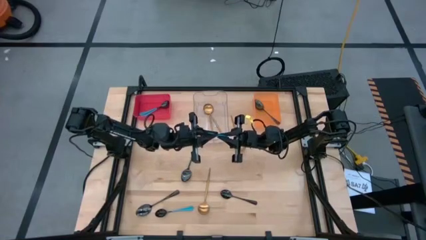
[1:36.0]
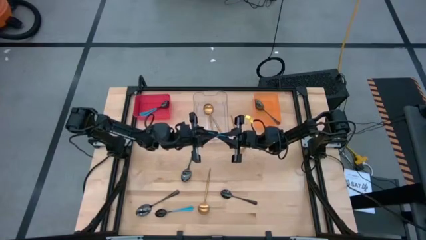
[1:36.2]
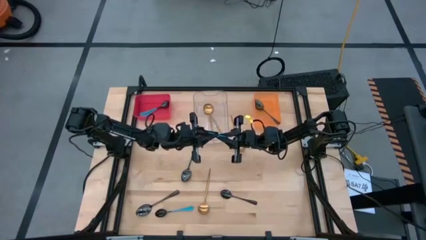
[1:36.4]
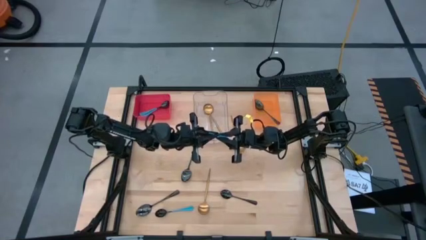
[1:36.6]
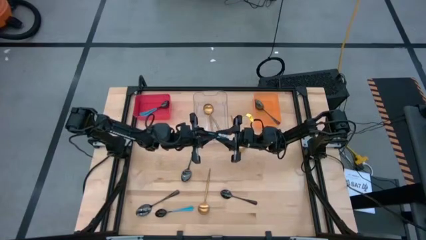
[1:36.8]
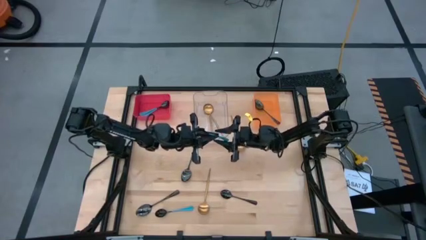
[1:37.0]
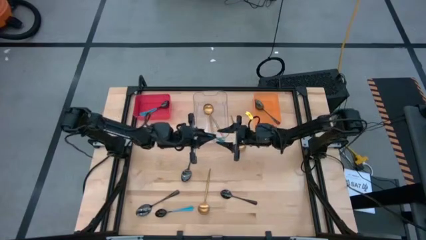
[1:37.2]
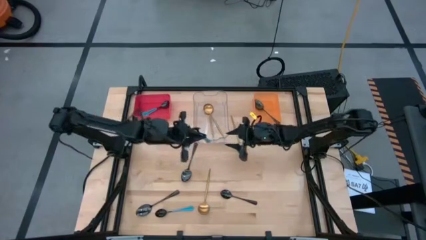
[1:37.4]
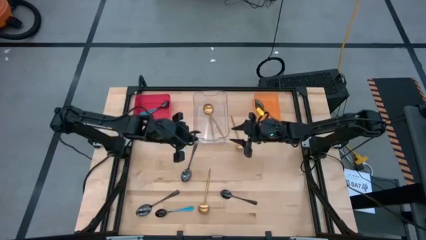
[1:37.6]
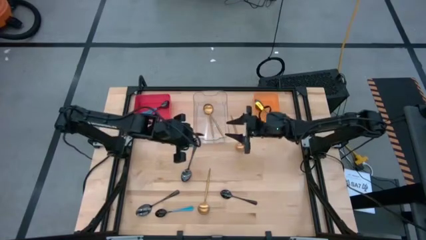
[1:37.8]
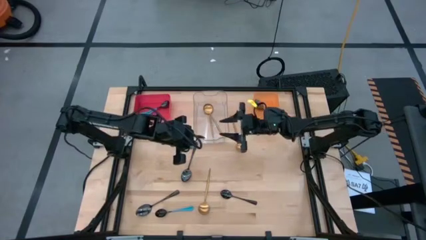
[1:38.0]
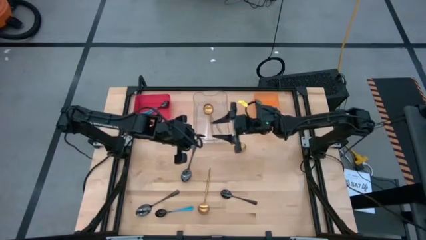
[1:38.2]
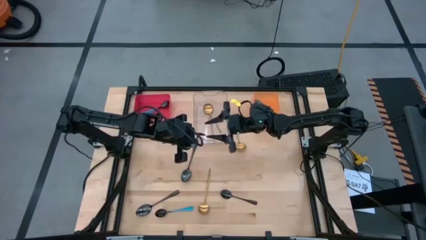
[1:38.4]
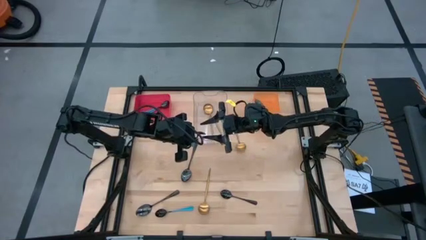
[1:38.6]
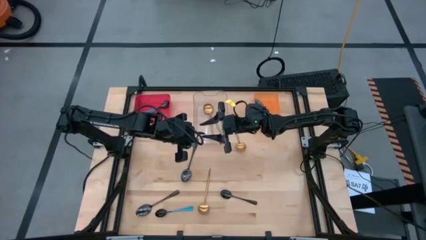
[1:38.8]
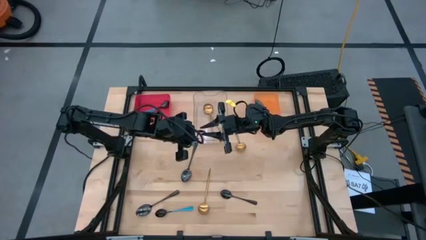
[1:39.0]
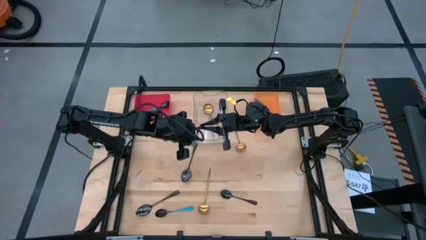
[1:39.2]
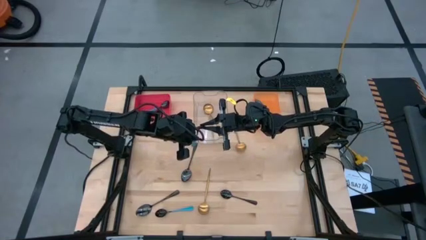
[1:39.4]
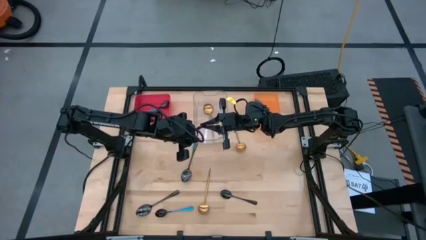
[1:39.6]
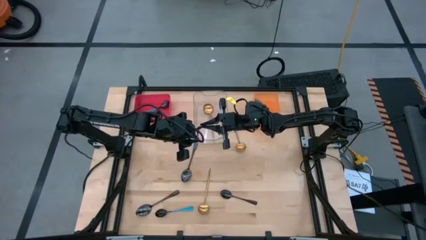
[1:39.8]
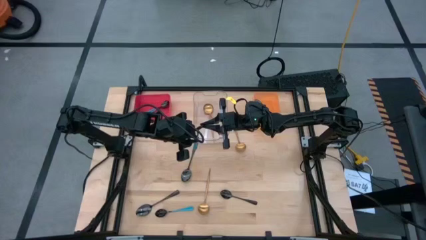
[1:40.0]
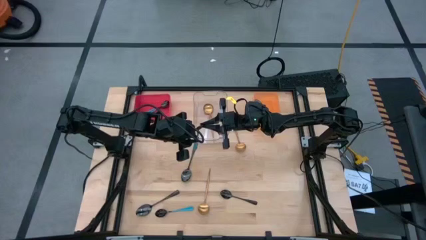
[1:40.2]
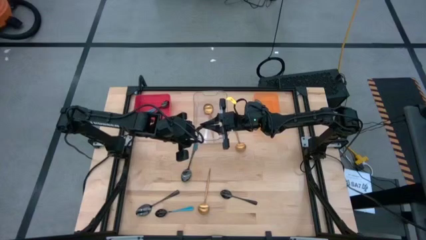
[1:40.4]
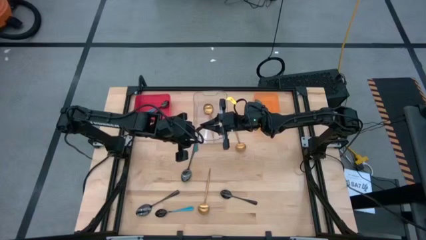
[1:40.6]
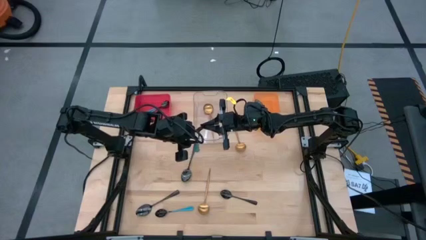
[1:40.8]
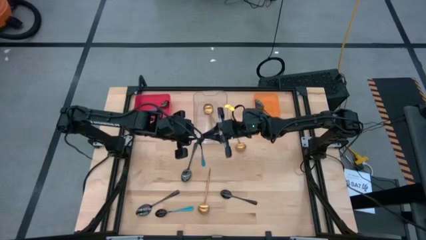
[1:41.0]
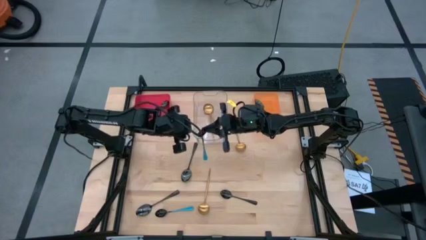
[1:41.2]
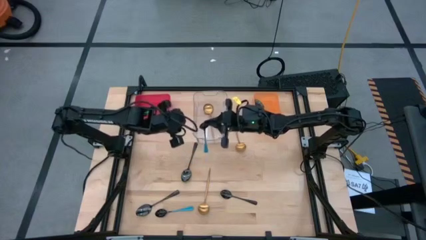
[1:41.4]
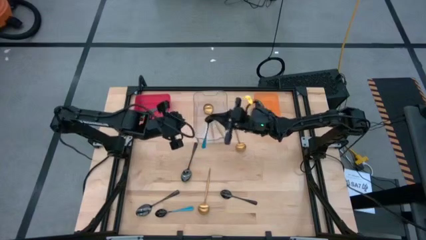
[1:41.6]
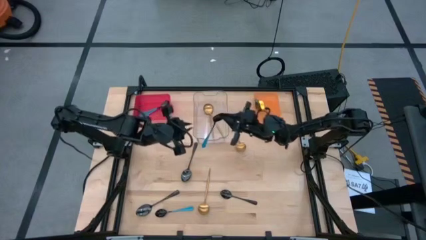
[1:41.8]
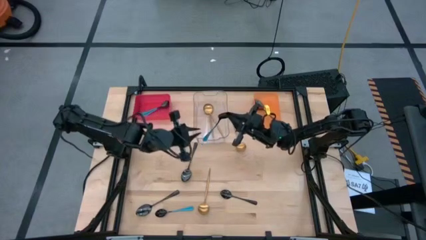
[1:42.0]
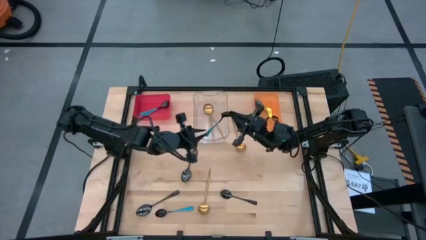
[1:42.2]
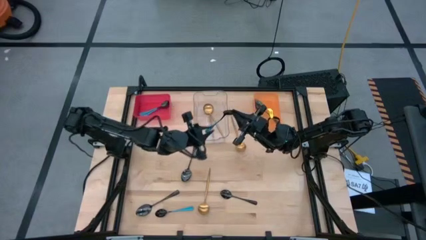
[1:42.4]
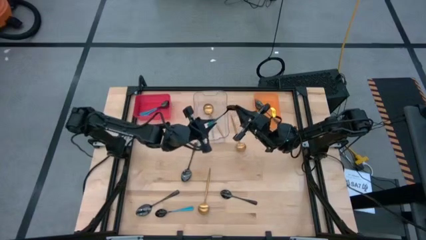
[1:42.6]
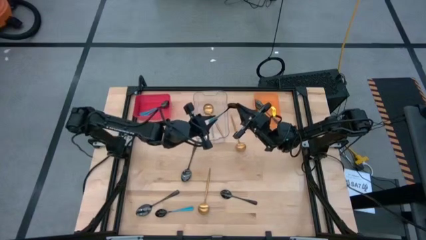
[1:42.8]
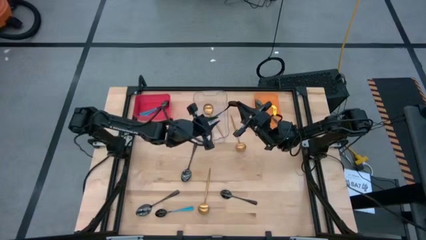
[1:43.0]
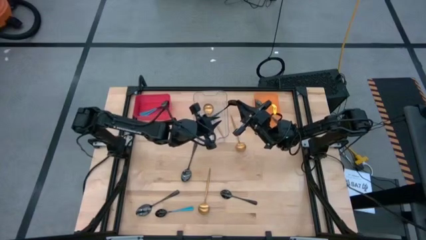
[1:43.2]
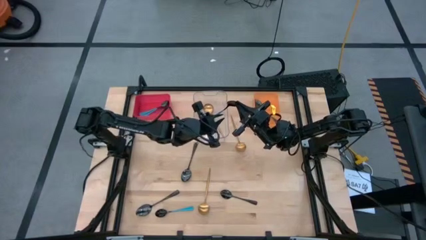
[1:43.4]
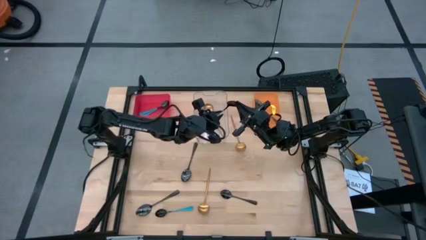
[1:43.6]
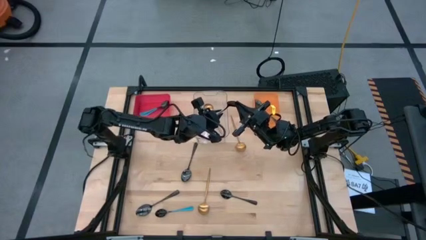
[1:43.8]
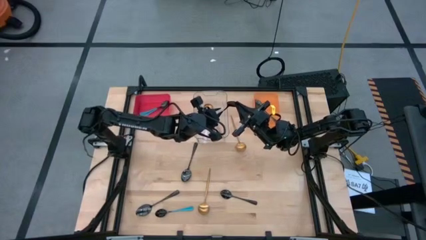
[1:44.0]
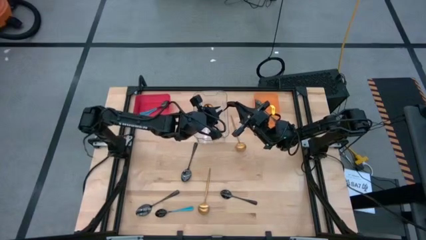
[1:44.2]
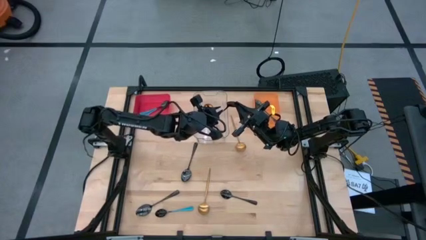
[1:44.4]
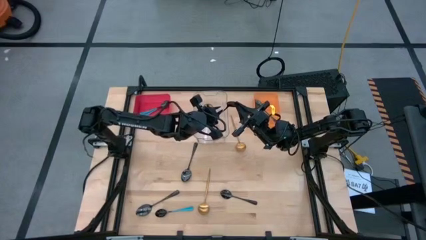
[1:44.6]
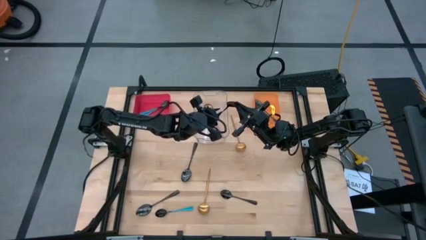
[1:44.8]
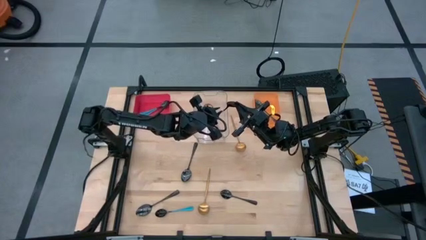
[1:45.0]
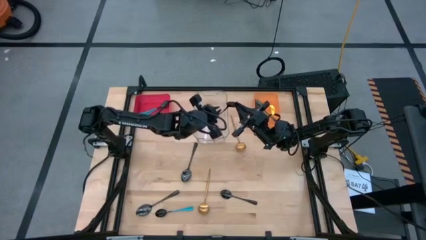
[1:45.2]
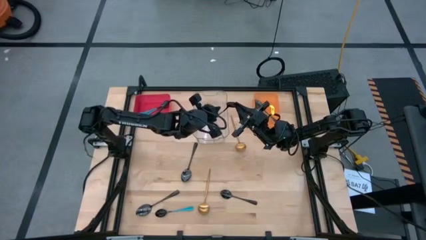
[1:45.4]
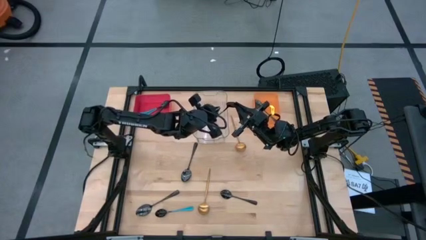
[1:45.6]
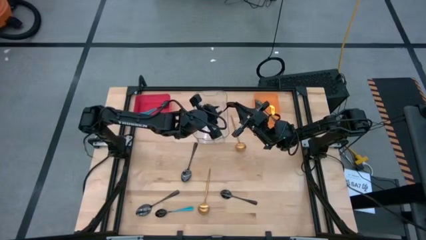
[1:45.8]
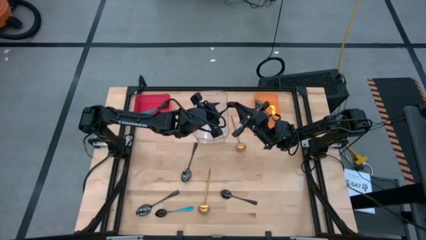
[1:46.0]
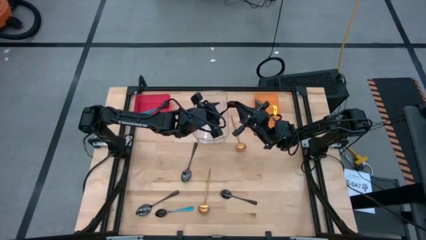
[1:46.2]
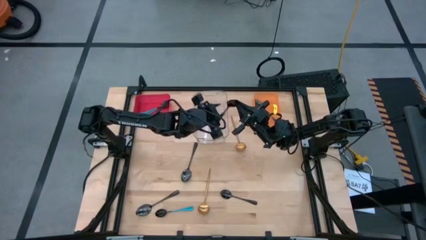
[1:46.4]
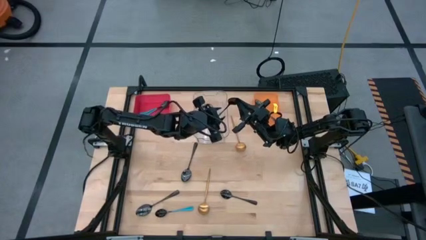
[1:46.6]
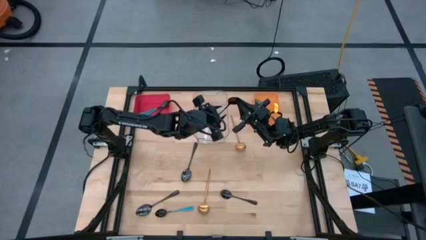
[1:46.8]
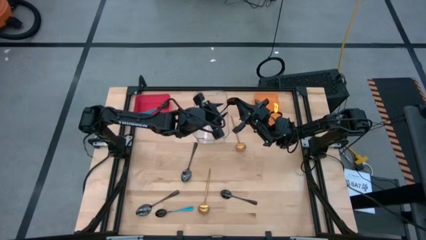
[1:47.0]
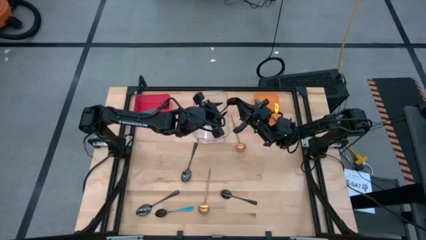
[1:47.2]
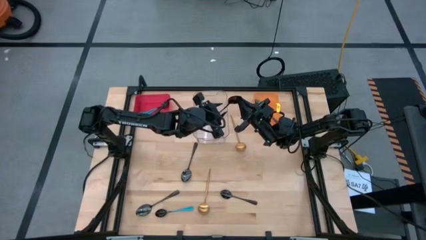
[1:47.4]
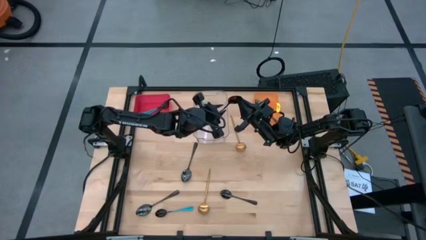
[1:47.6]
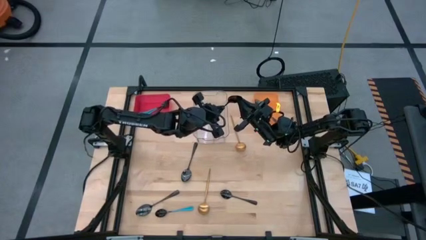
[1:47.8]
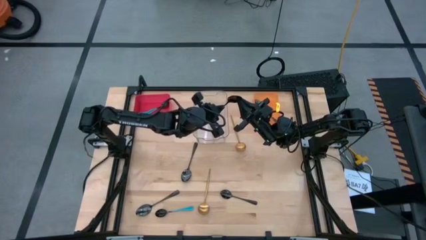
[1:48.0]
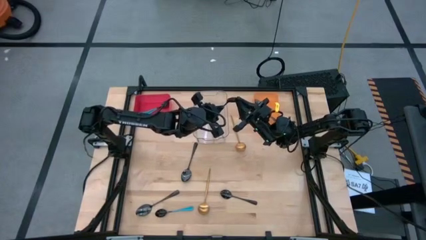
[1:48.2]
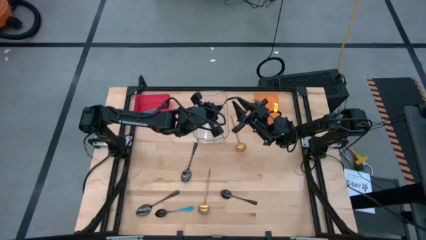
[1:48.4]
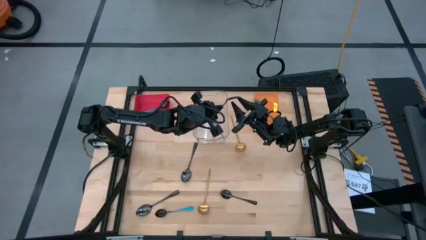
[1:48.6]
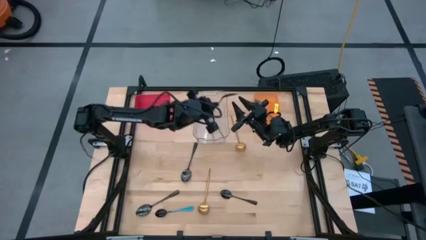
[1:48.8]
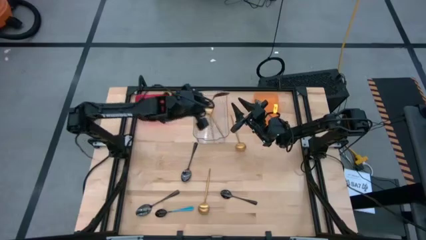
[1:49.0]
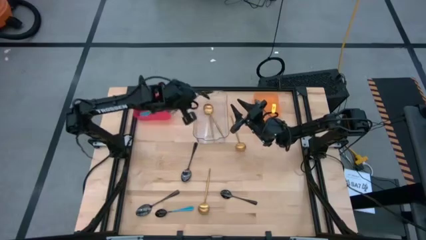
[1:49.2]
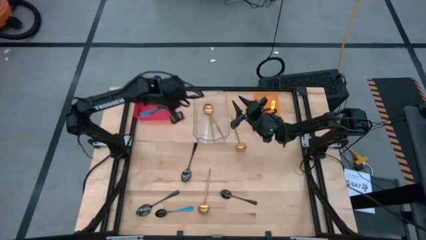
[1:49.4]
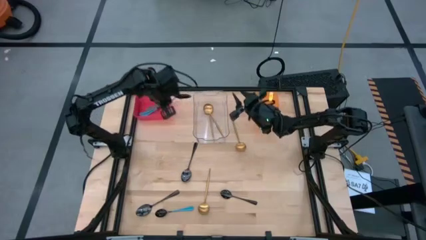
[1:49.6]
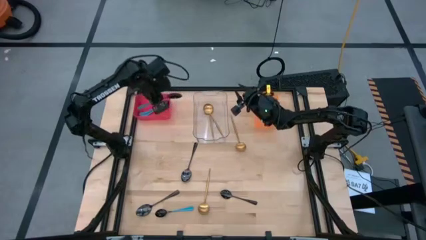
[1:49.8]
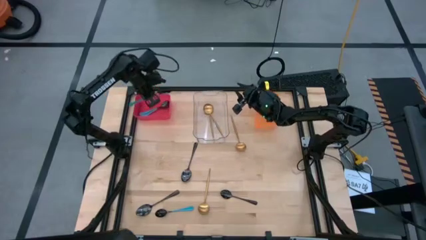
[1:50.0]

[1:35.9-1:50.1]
Task: Sort silverware by color (type)
Put the blue spoon into the red bin
